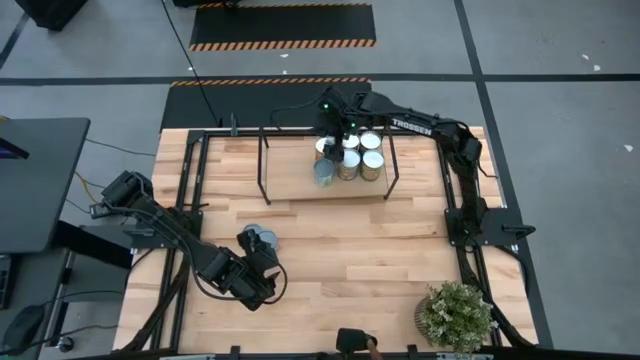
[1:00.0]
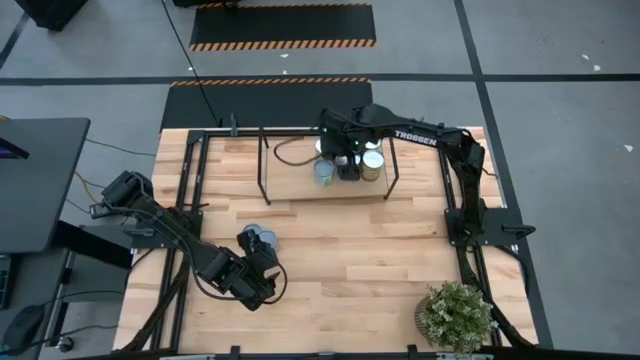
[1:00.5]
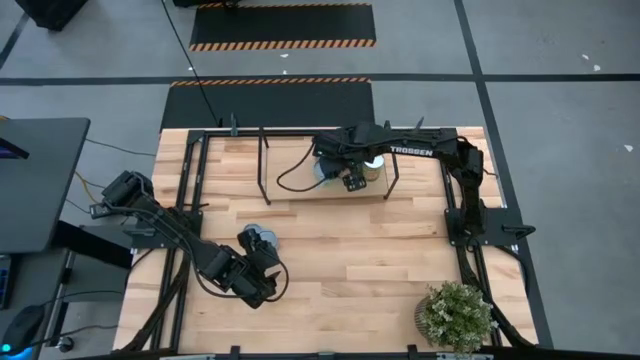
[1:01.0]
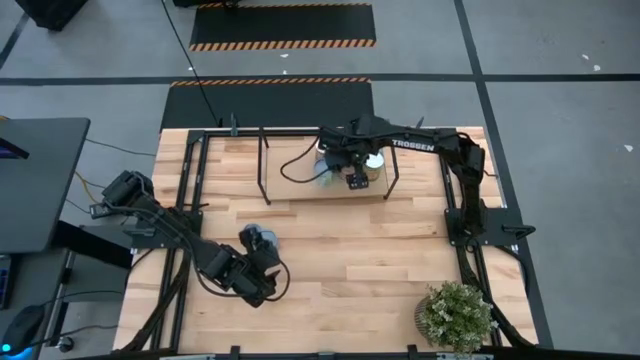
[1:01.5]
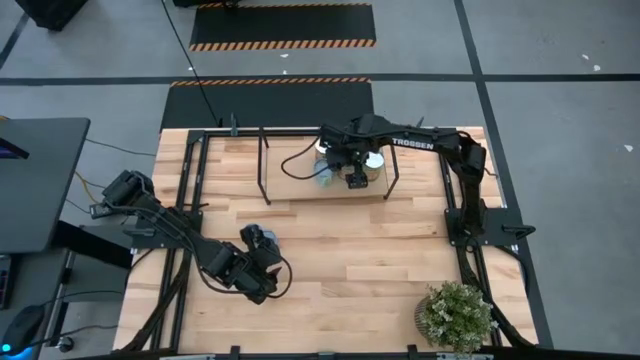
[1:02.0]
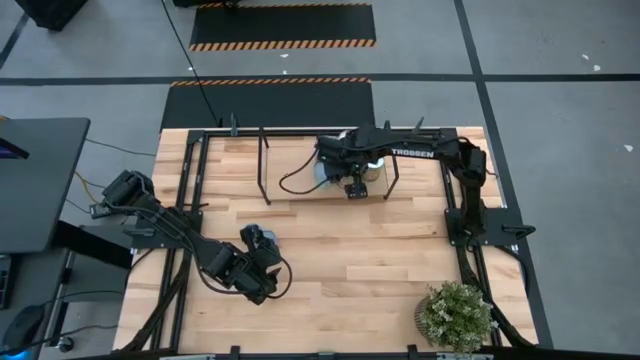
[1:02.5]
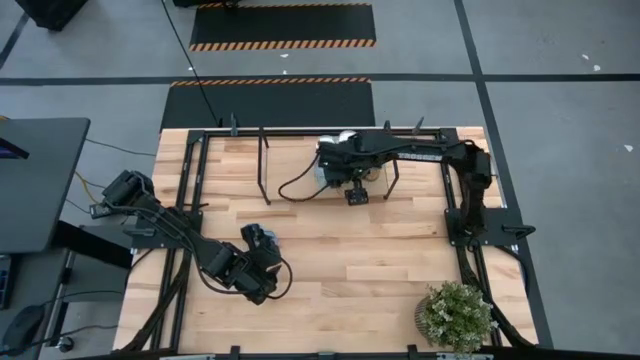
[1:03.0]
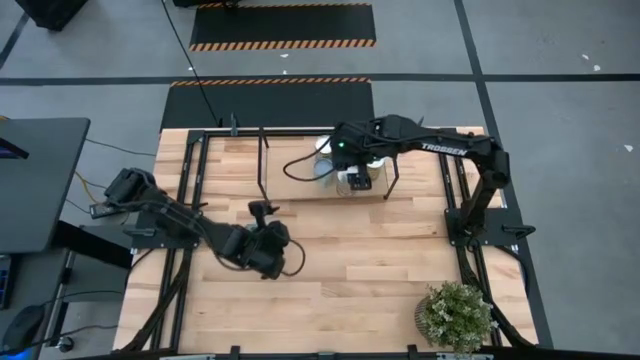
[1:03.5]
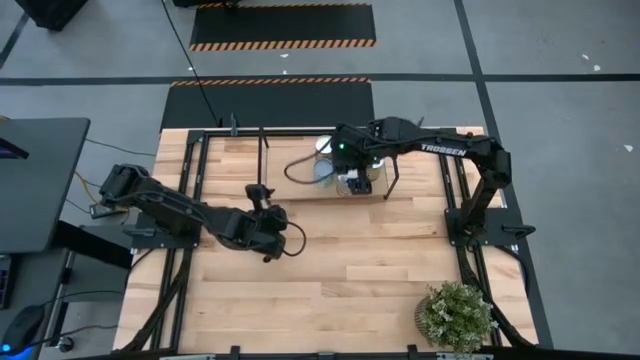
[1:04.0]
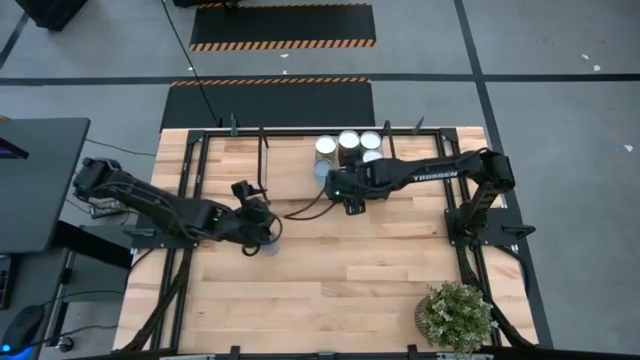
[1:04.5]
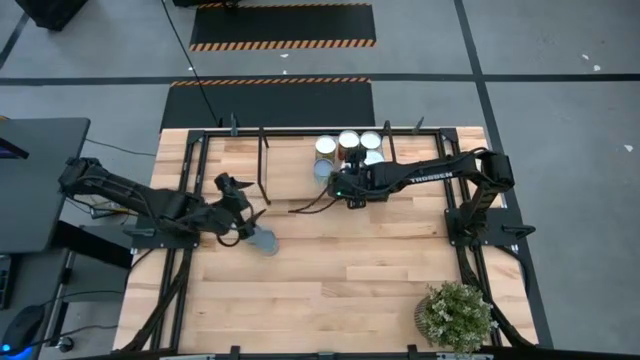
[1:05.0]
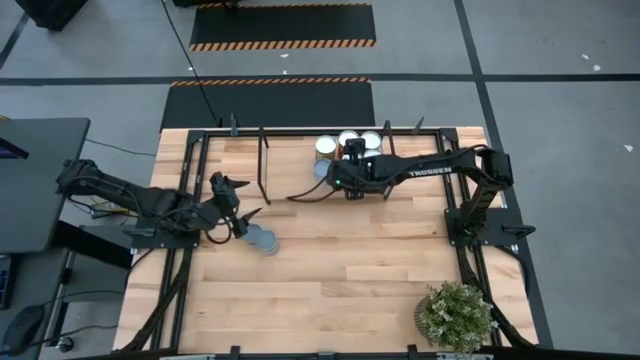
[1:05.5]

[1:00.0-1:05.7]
Task: Pick and place cans onto a shelf
Adjust the canned peaches

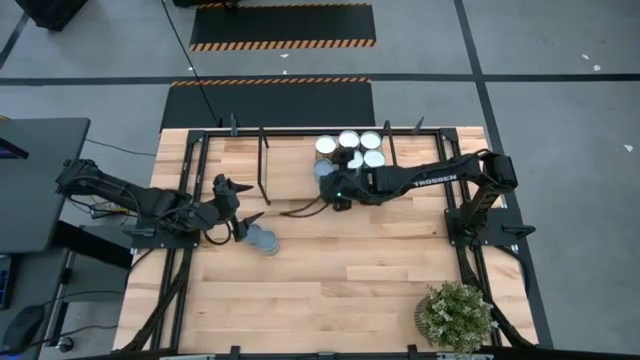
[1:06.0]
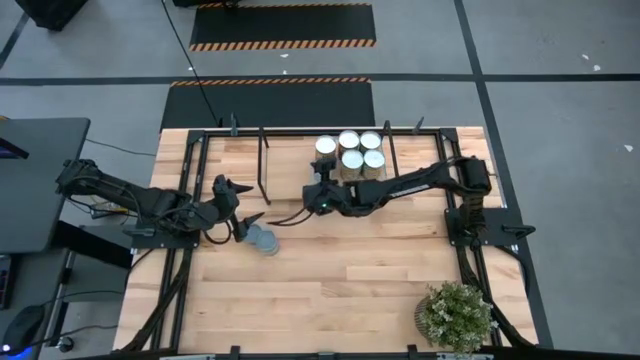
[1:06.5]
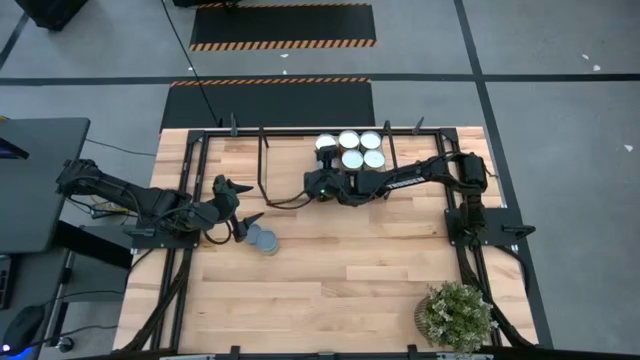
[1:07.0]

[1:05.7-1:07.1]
Adjust the canned mixed vegetables

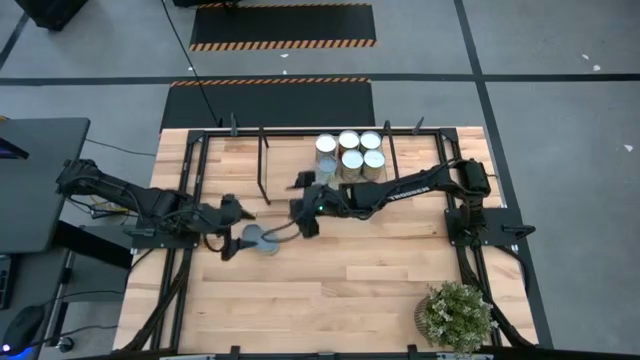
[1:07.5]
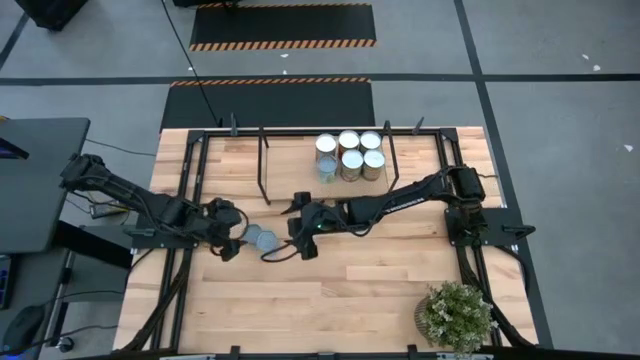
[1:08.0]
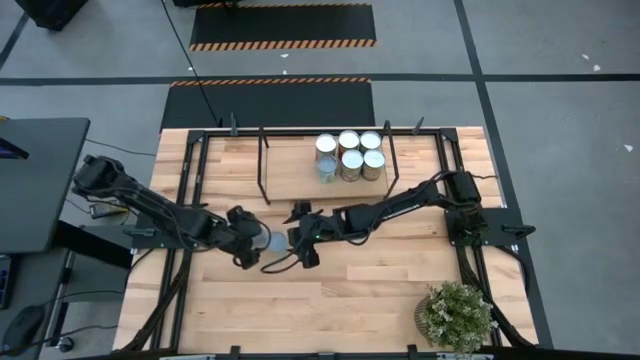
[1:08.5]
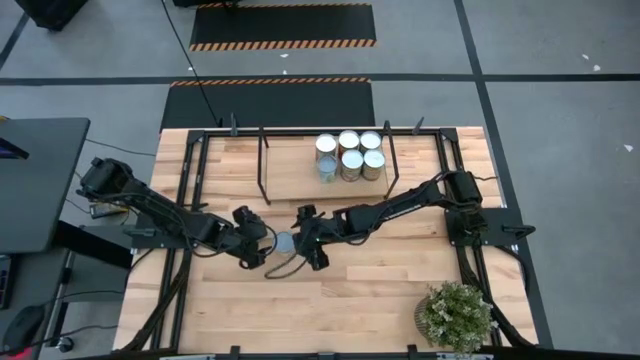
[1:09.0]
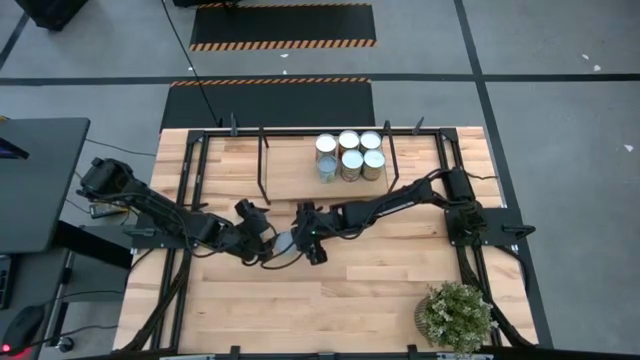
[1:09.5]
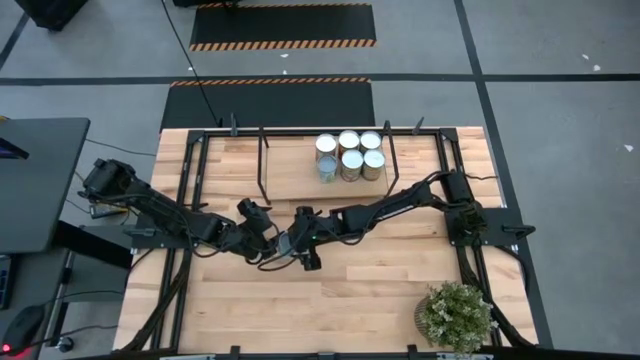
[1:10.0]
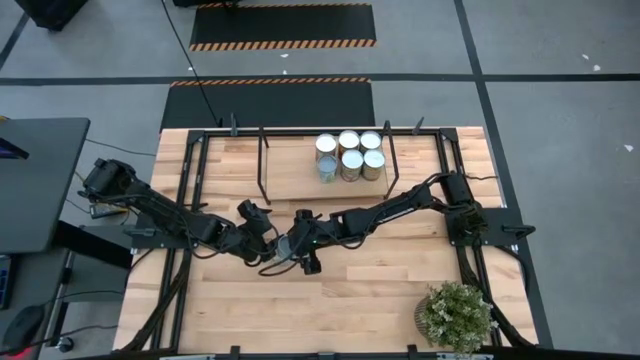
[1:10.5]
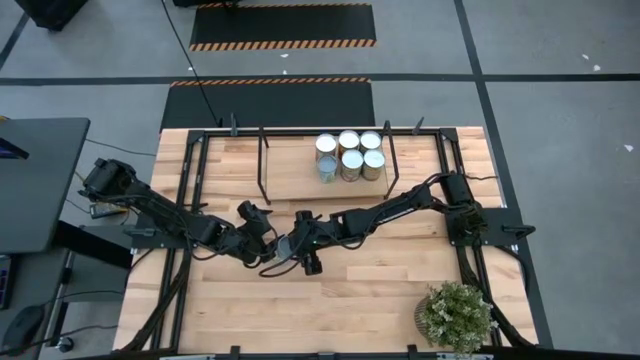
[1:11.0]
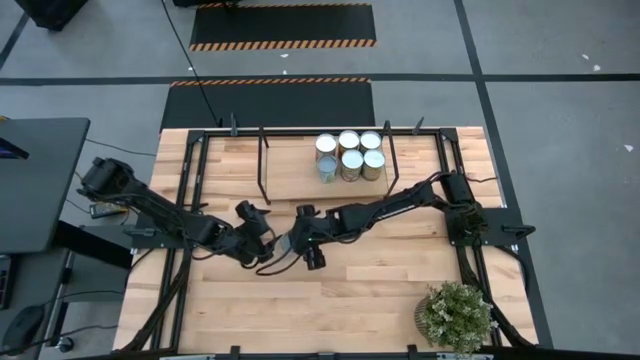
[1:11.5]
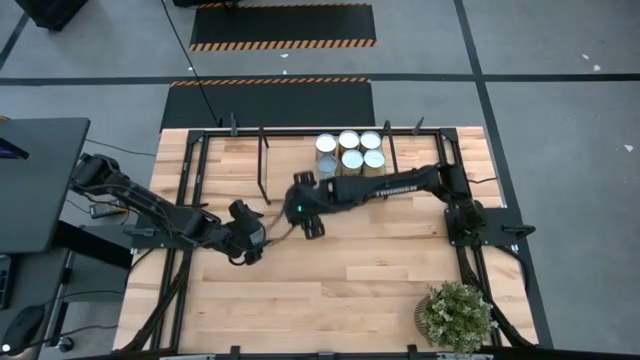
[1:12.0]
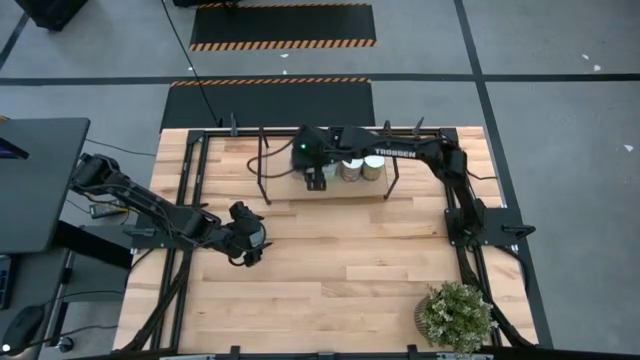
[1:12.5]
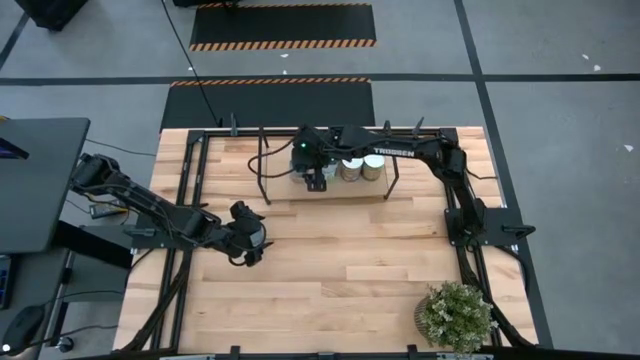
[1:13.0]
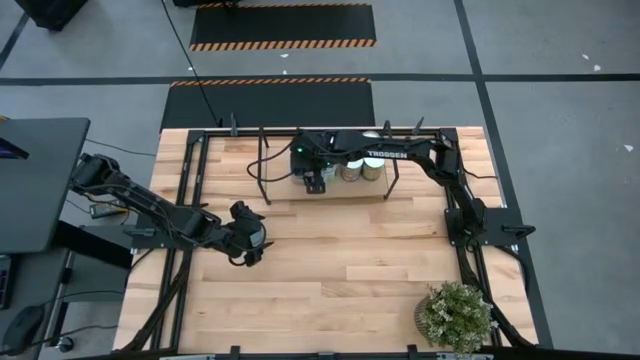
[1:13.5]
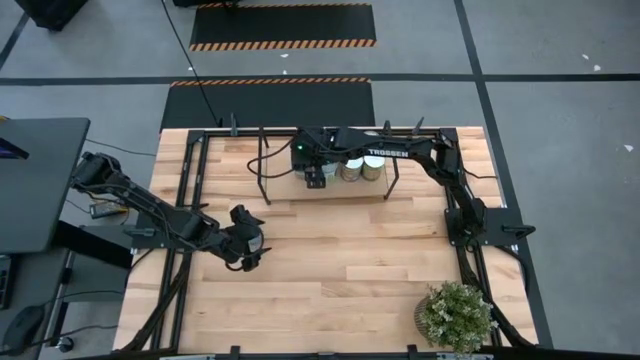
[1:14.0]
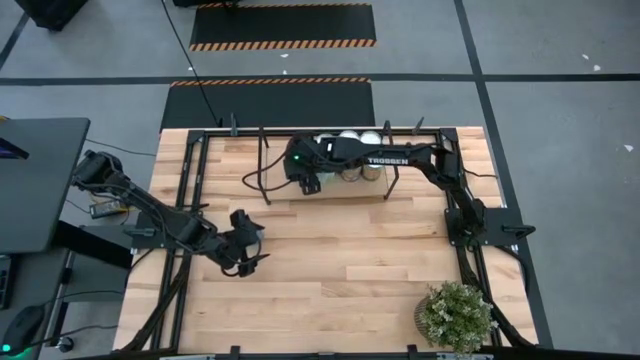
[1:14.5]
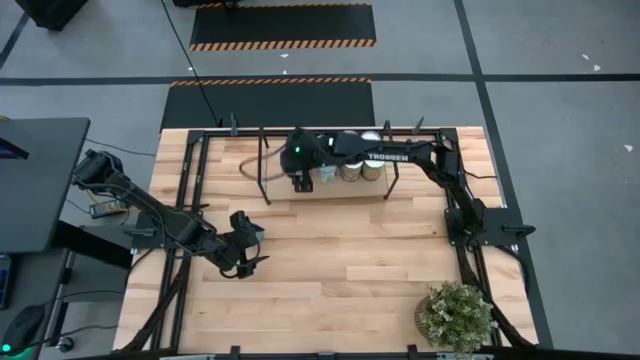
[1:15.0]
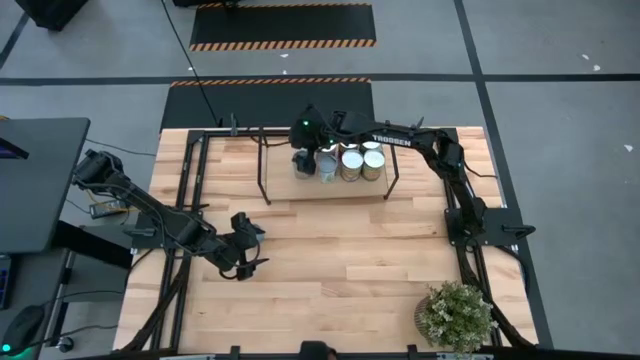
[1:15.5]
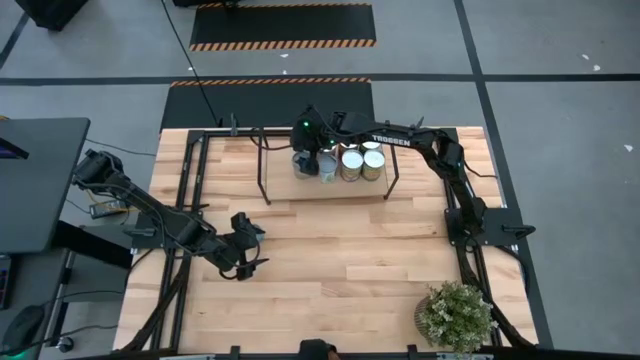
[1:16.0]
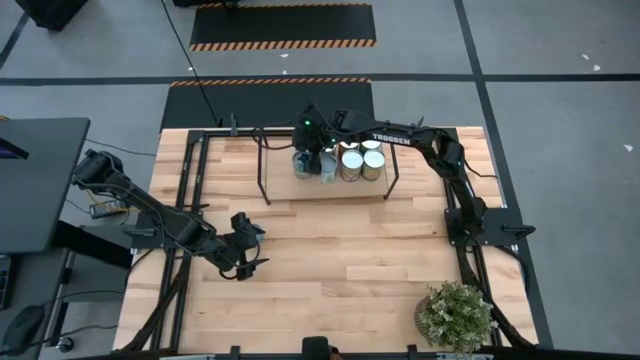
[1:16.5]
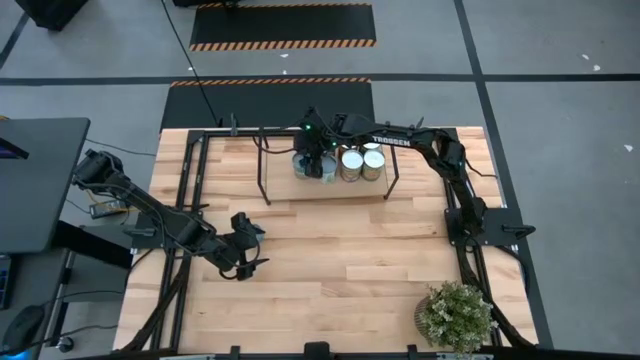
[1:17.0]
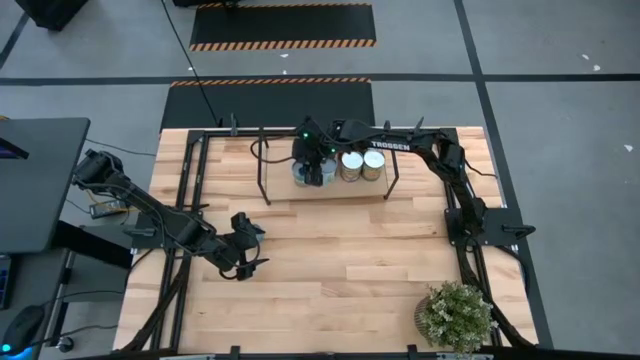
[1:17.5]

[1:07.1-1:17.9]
Put the canned chicken soup on the shelf

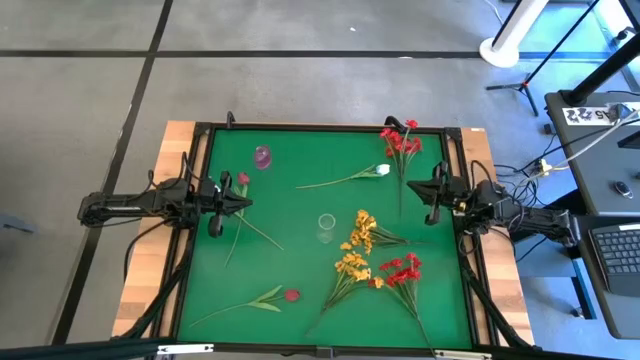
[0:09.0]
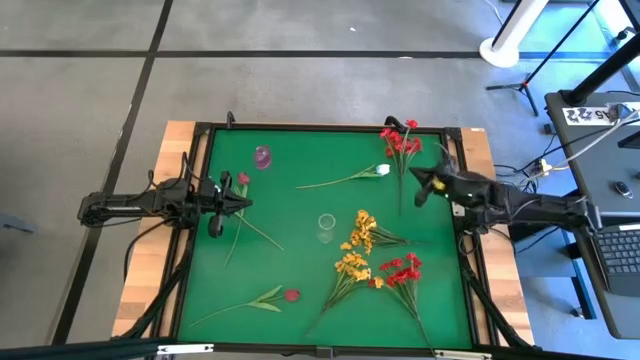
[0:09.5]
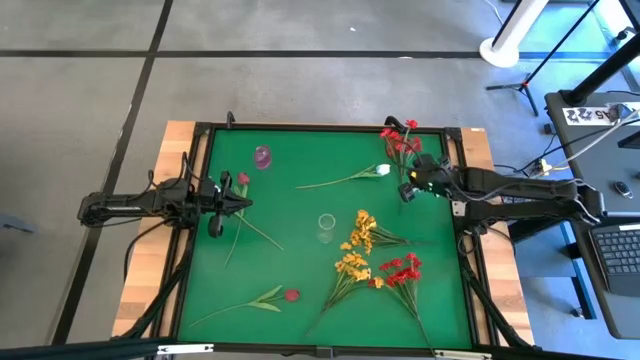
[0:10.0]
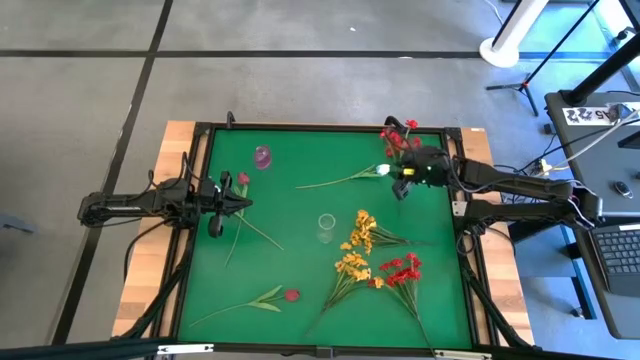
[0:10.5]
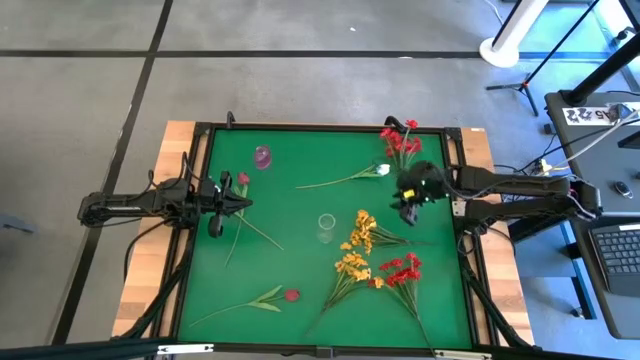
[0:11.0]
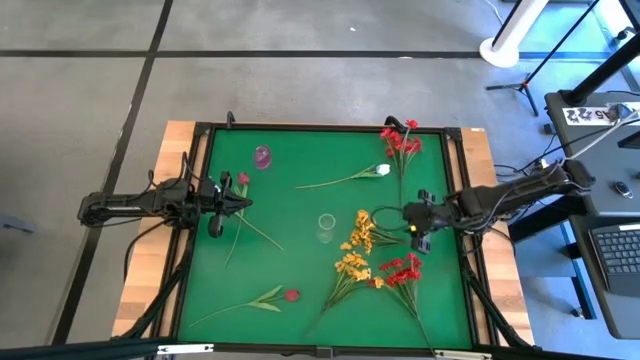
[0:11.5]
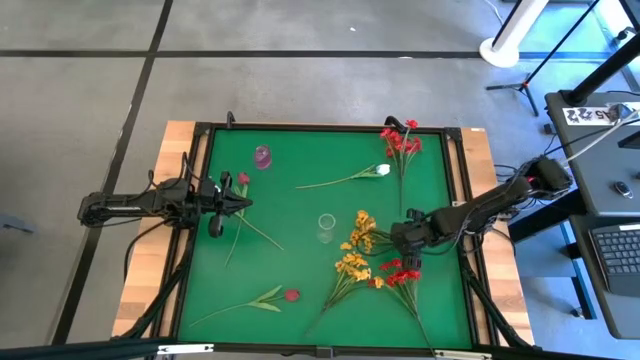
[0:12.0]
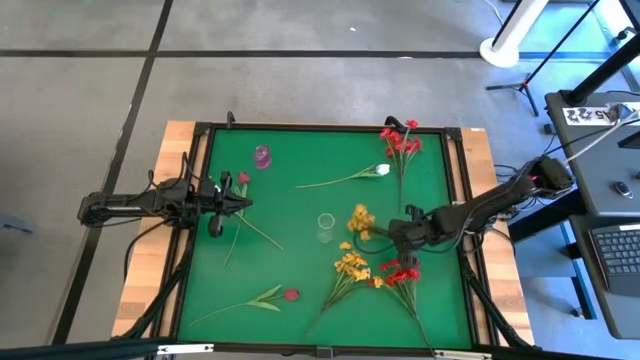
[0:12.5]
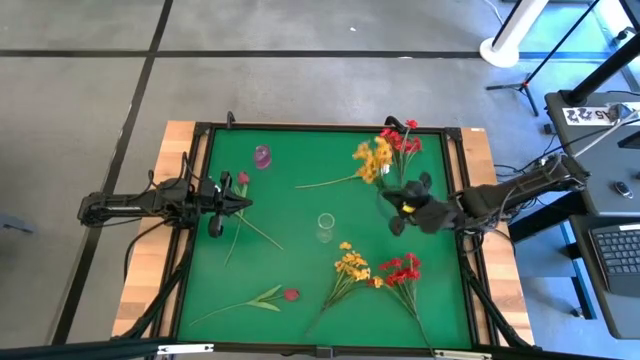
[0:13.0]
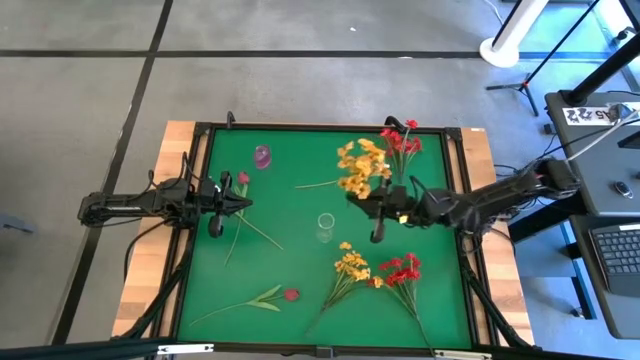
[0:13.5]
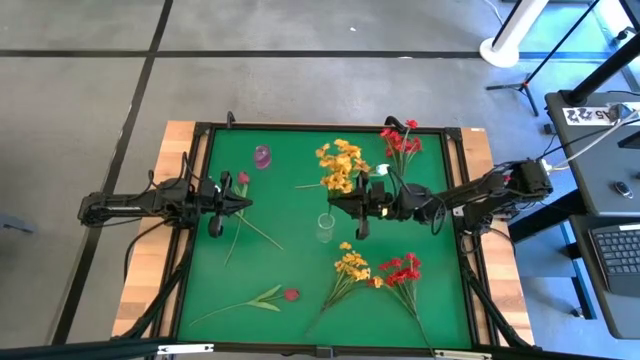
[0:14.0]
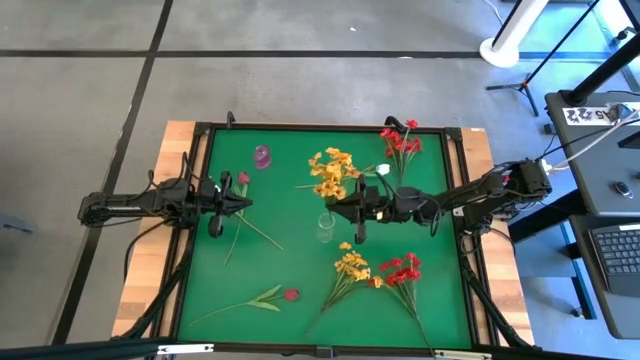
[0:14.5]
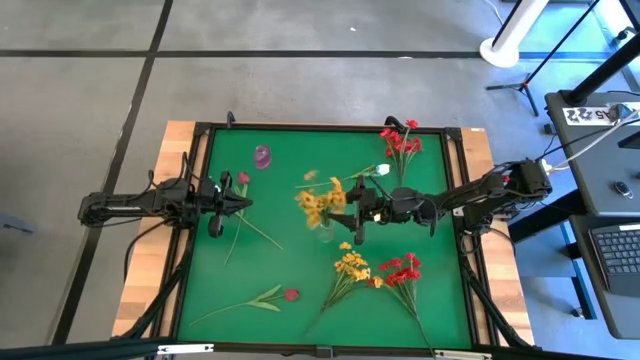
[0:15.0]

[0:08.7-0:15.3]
Task: Sort flowers into vase by color
Put the top yellow flower into the transparent vase
